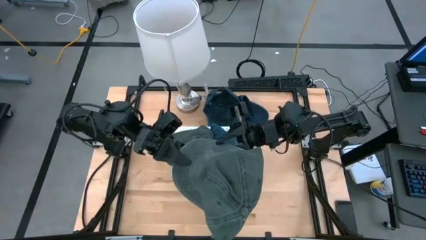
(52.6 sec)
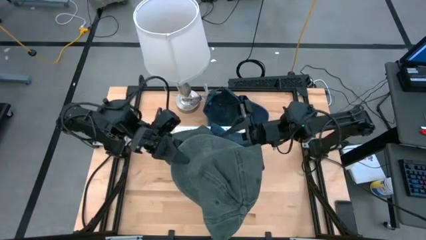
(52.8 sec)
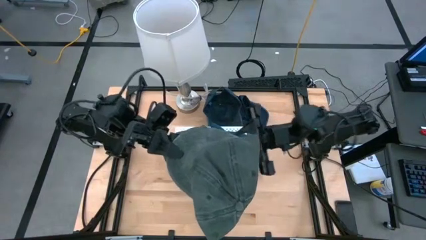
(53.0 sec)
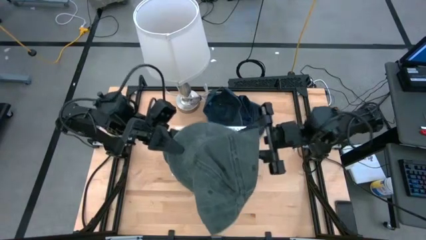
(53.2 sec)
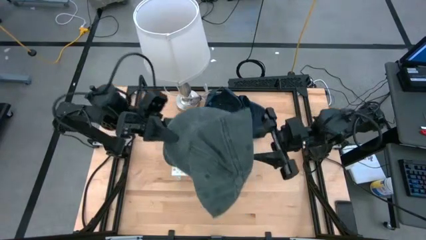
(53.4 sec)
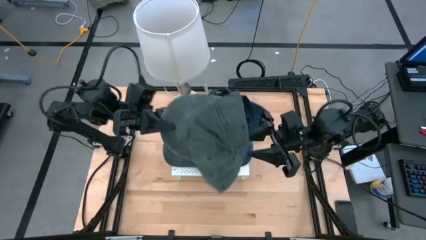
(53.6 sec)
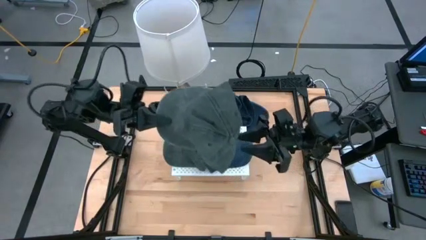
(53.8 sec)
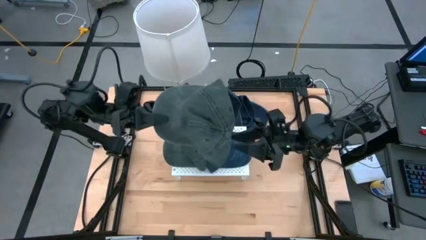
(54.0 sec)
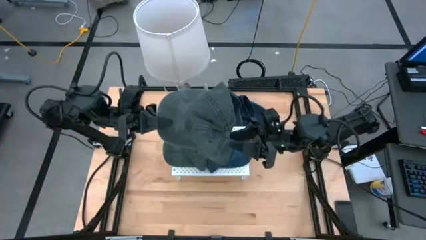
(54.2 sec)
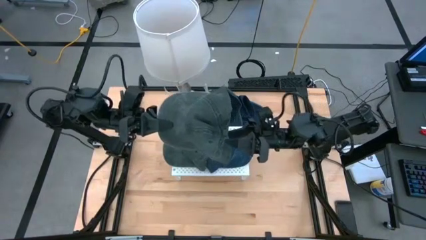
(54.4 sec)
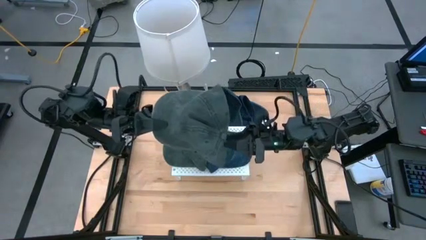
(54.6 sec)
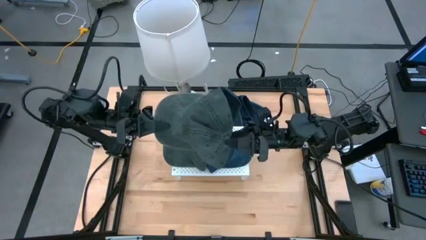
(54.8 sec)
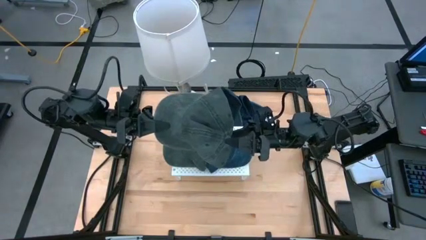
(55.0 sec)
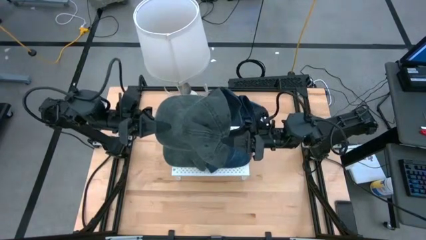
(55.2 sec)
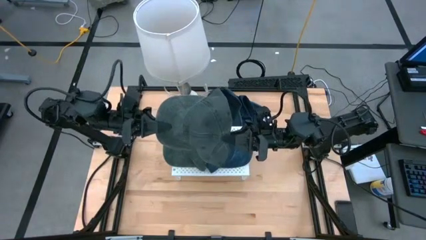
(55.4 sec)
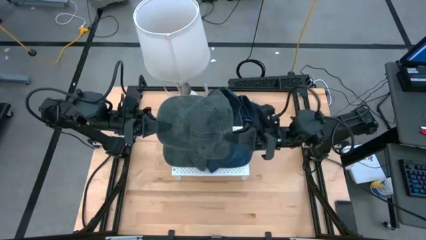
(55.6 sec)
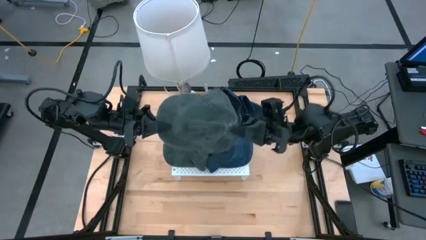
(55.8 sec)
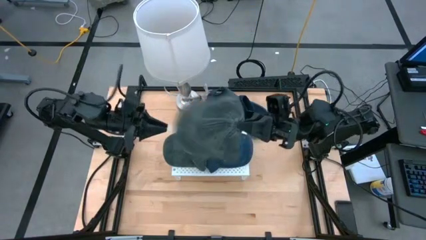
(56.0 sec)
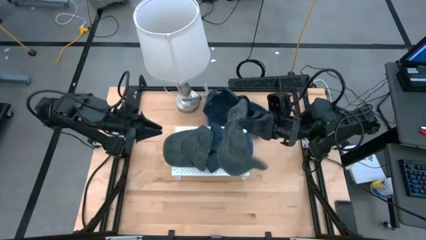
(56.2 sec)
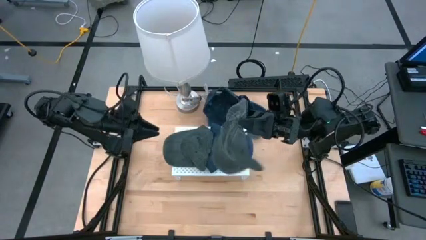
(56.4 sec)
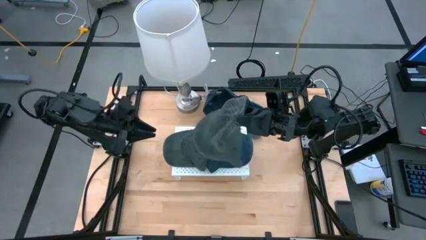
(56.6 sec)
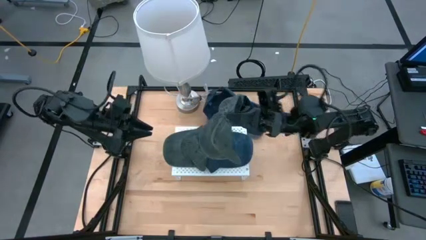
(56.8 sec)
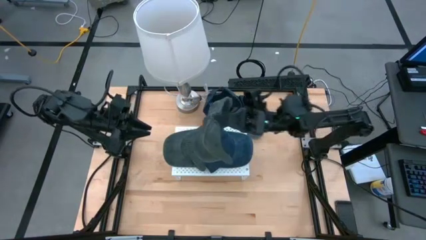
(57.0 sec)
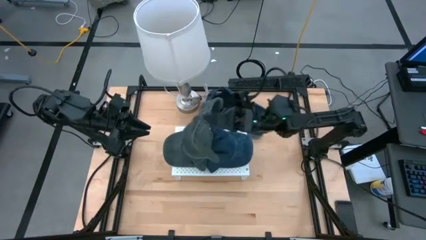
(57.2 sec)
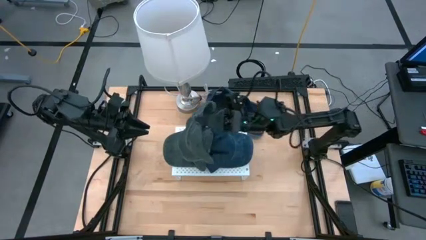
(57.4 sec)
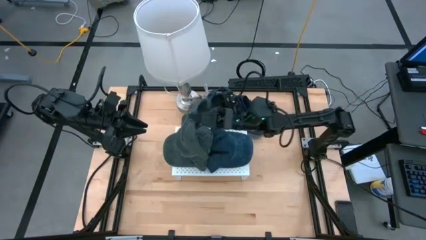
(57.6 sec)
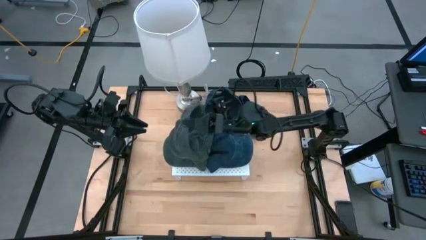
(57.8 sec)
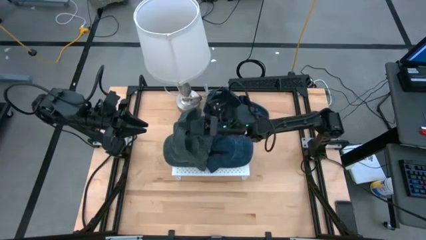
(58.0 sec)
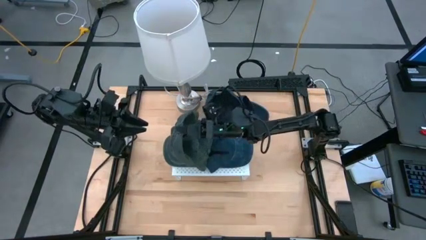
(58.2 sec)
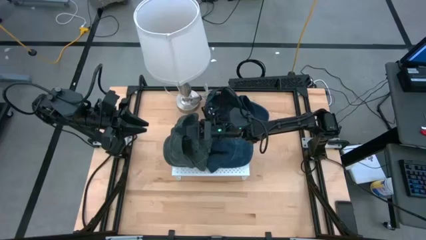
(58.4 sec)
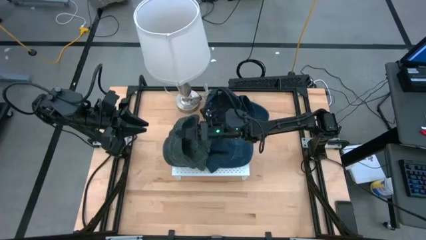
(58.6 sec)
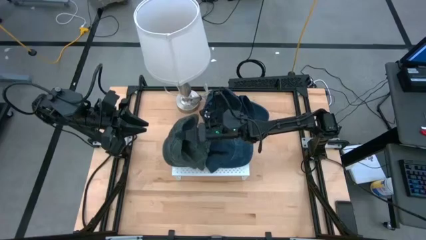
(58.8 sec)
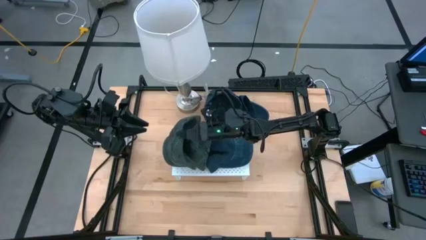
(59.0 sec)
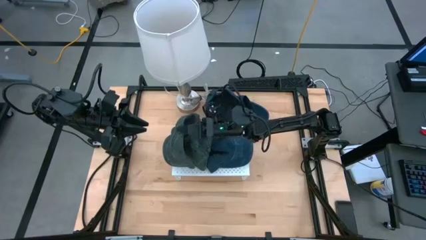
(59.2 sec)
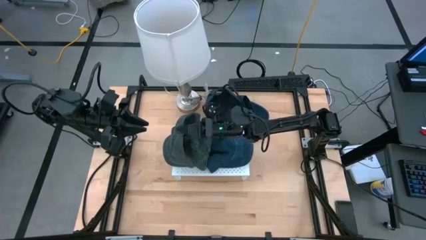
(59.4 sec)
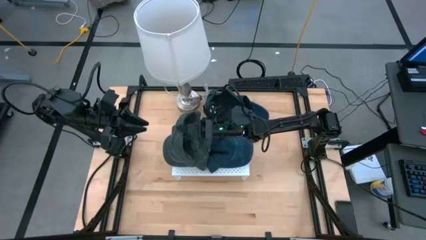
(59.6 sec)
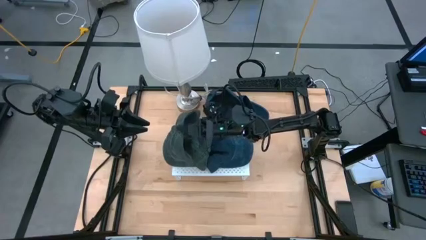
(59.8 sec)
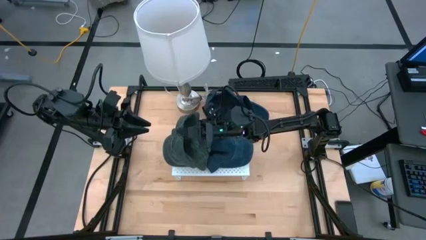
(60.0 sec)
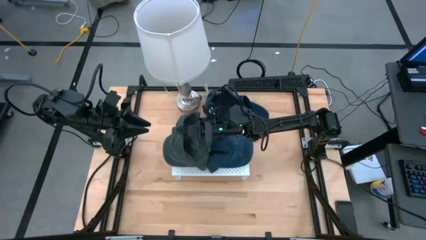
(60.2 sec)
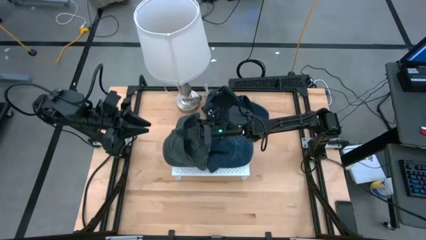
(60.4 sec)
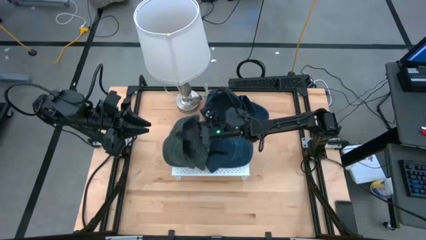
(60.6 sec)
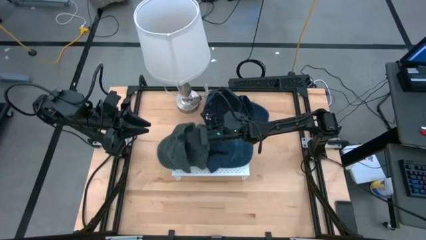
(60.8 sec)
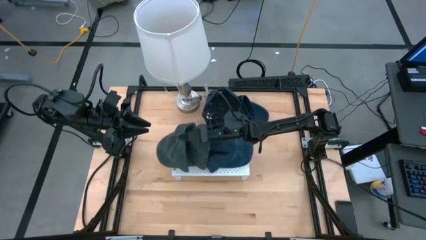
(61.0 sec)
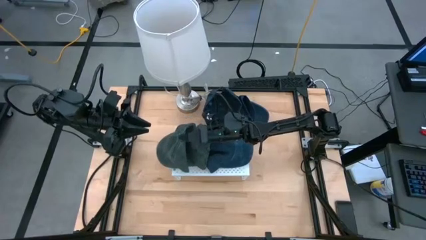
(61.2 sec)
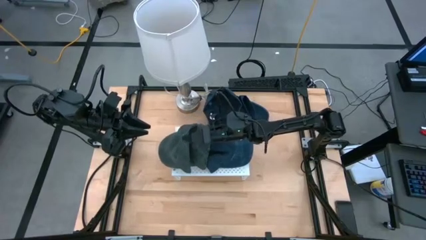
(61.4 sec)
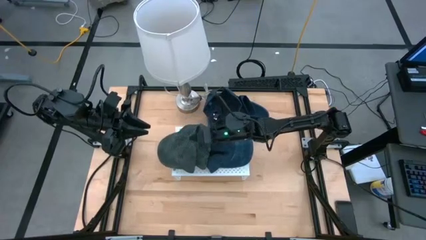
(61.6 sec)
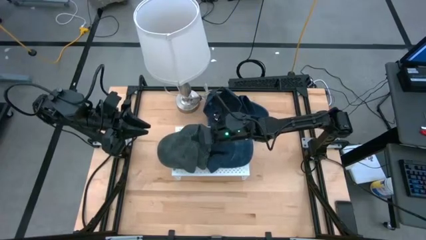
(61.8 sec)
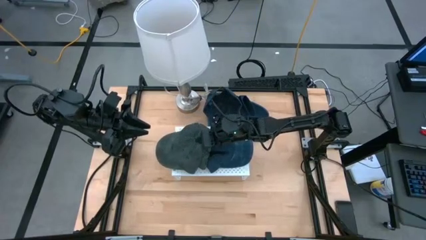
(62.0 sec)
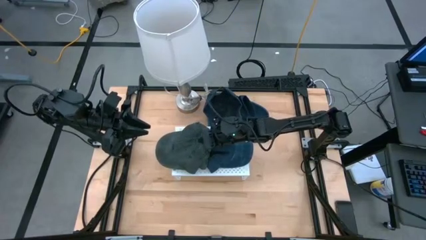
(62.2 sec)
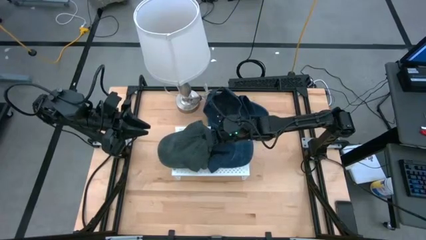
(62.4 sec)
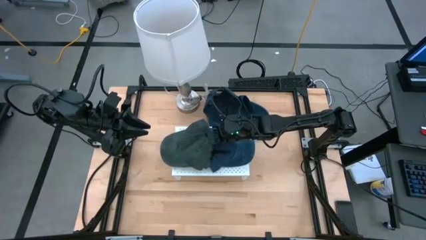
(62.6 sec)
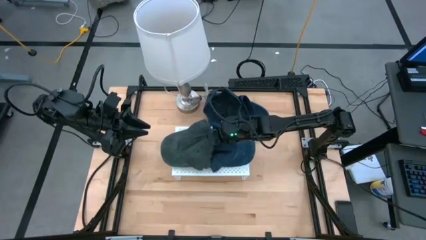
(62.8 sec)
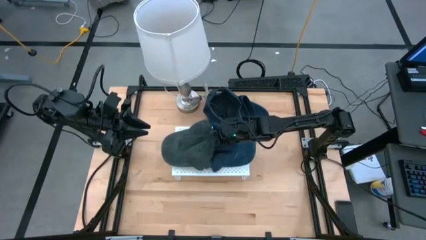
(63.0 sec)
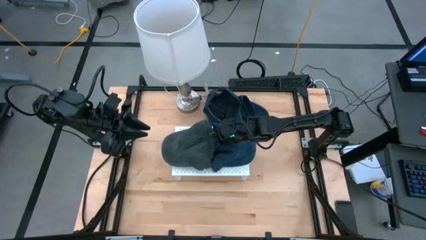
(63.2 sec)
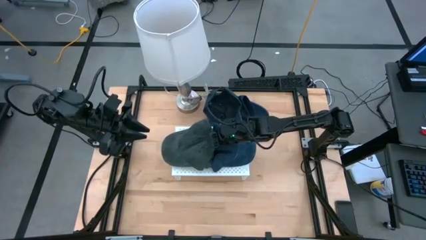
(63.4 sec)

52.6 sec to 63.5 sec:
Task: Pick & Place hat
Stack the right black cap on top of the other black cap on the shelf

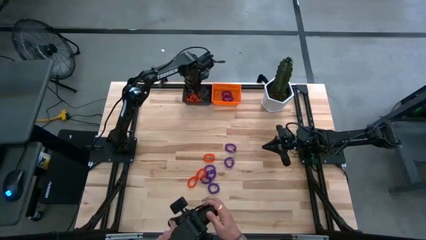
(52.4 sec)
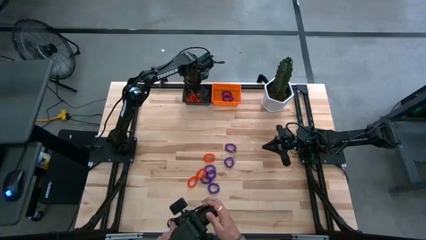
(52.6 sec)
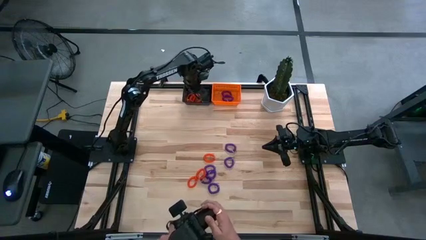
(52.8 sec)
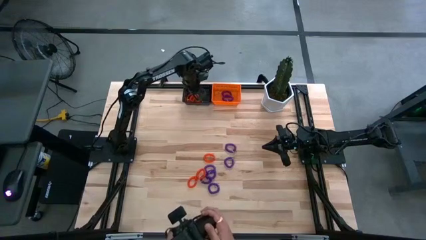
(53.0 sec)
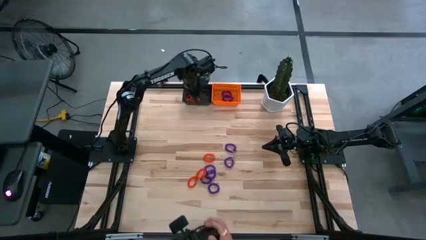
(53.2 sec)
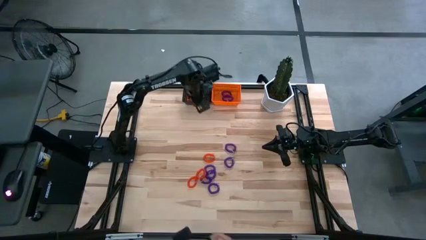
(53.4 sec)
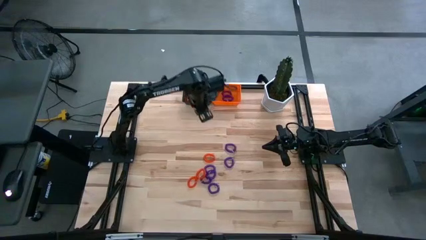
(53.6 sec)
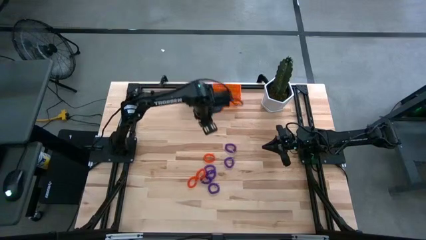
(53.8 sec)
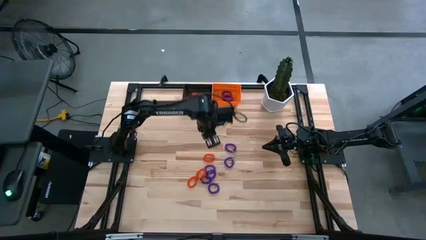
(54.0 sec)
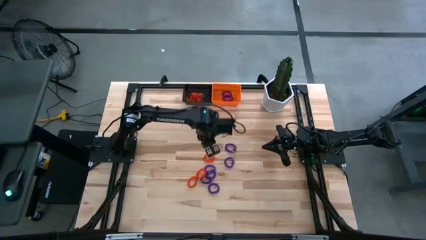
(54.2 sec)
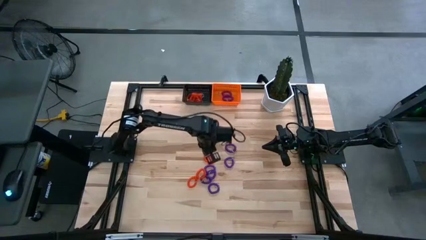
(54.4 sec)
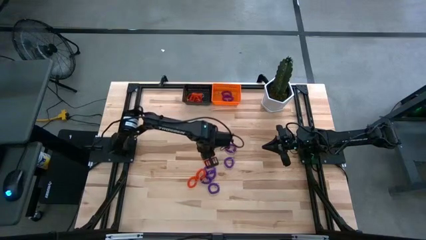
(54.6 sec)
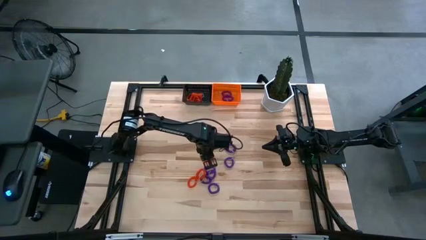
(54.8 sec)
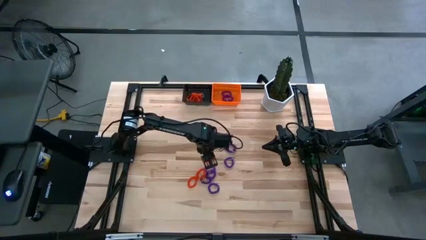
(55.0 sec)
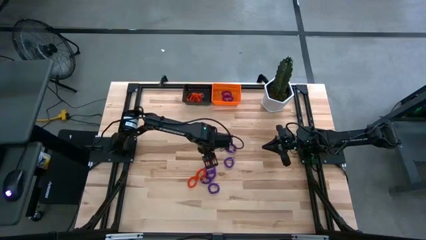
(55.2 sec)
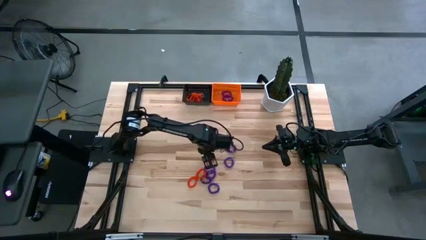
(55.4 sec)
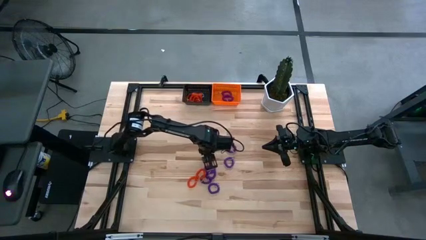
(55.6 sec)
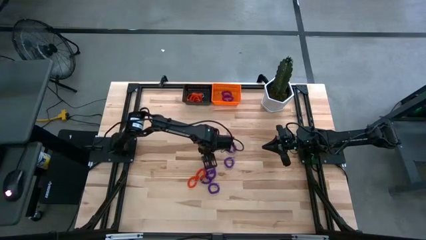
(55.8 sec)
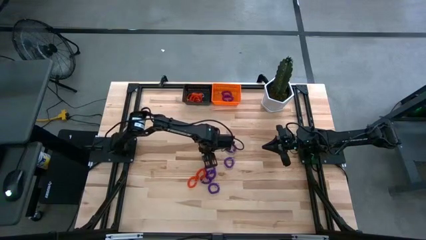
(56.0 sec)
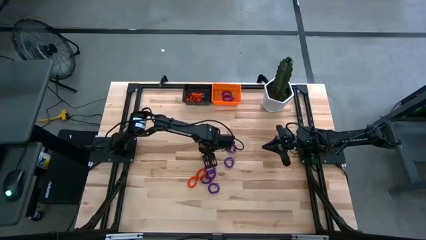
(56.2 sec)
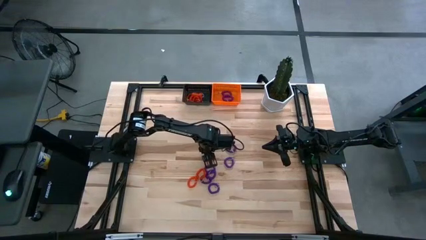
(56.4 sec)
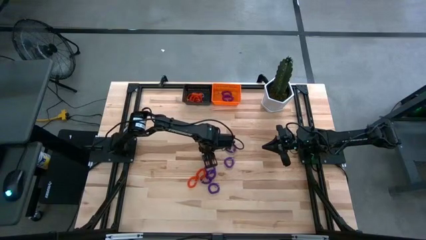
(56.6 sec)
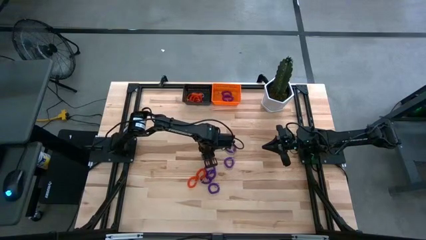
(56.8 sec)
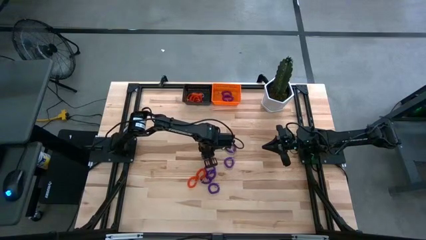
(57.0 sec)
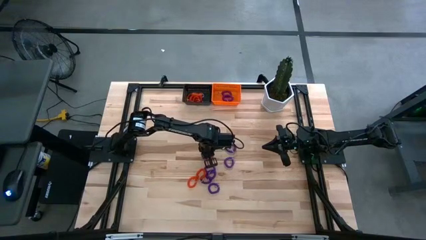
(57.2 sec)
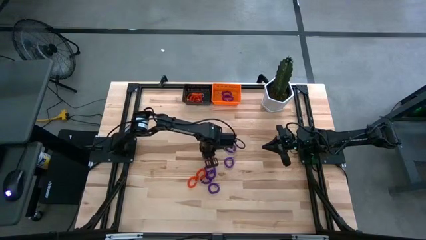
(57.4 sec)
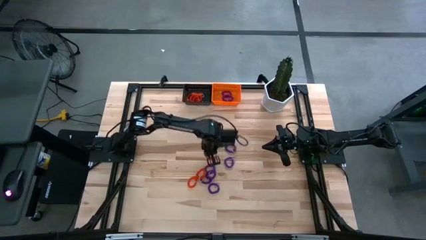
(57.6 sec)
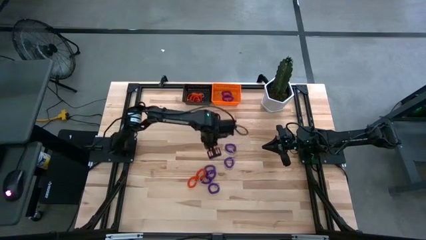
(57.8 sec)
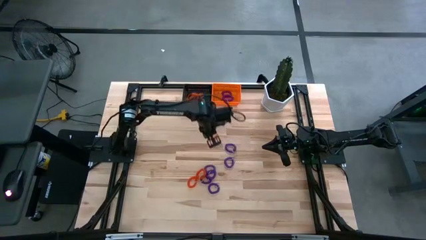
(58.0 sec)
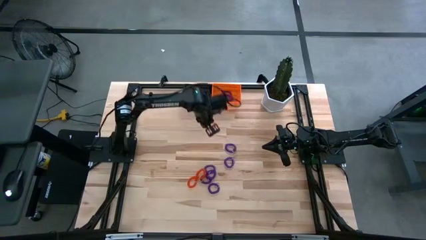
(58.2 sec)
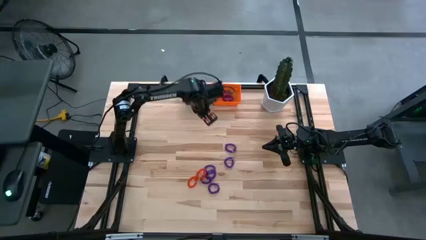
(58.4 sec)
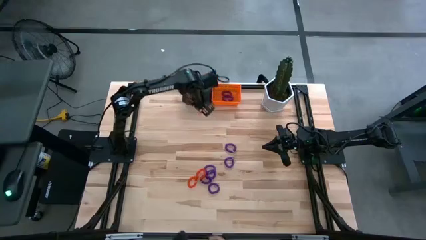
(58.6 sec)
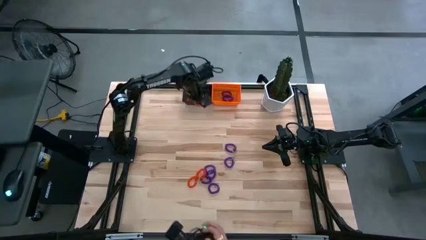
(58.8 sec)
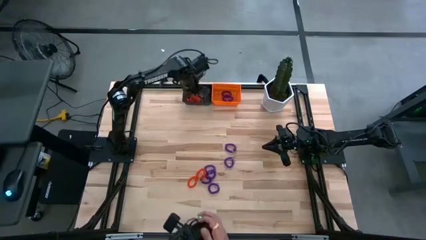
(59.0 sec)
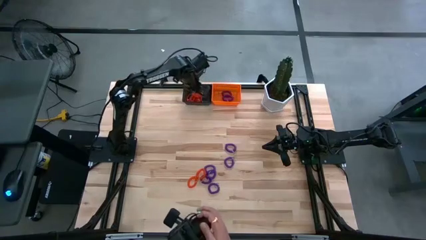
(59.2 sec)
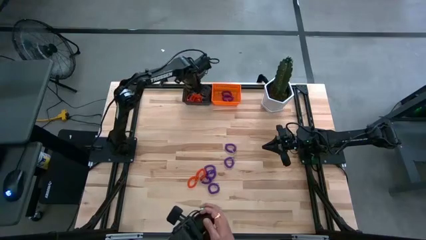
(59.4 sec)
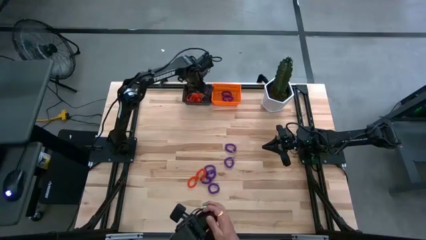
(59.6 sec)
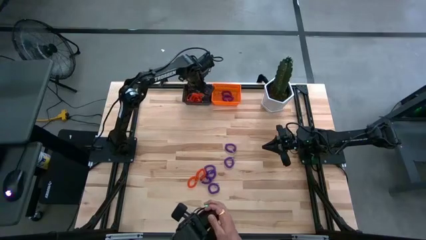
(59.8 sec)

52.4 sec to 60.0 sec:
Task: Sort spring keychains into baskets
Put the orange spring keychain into the black basket
